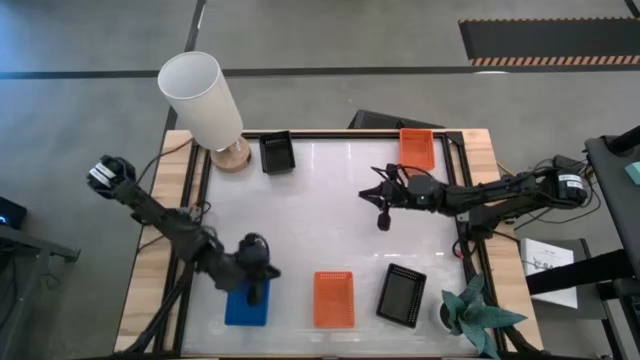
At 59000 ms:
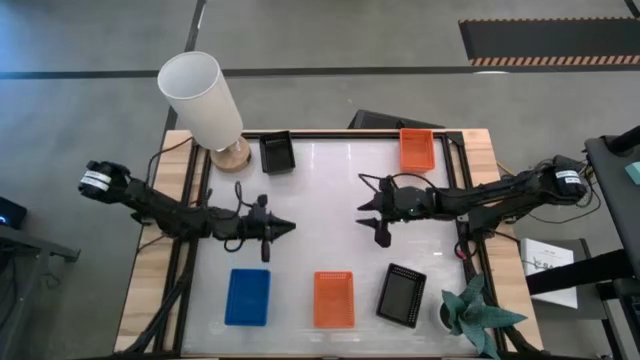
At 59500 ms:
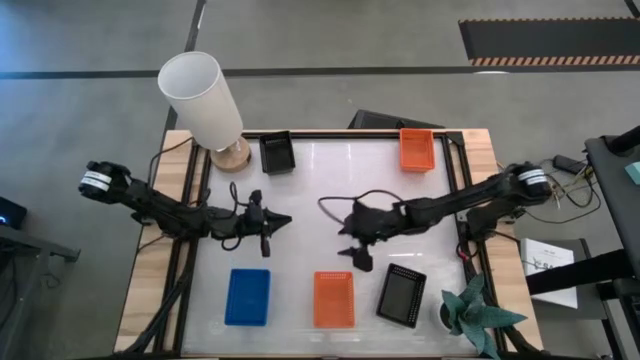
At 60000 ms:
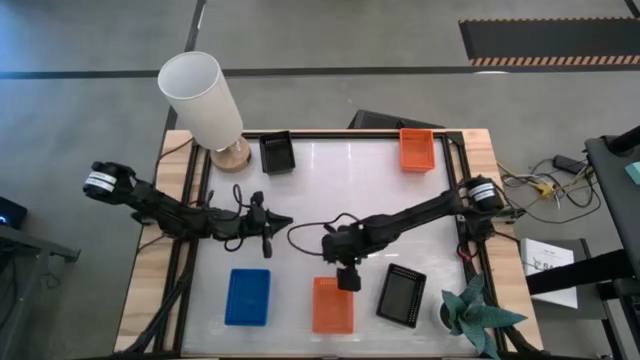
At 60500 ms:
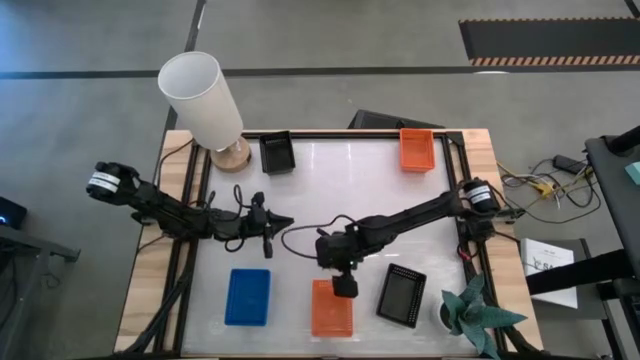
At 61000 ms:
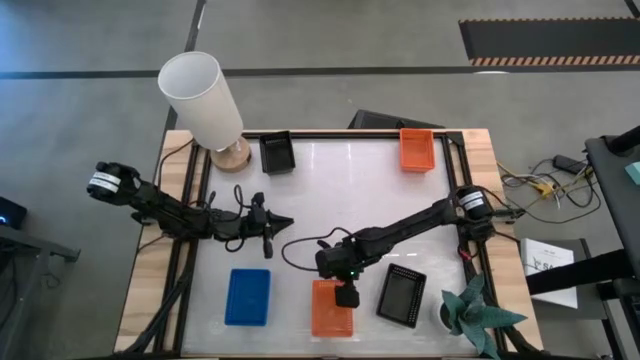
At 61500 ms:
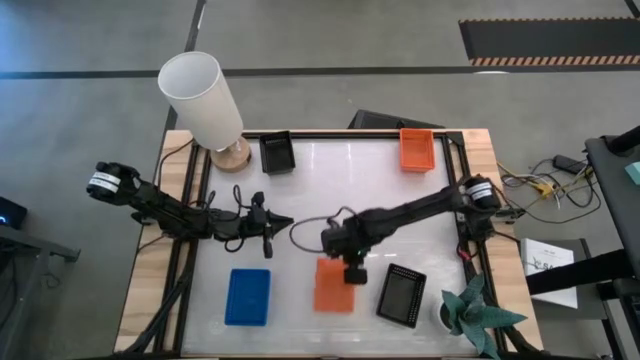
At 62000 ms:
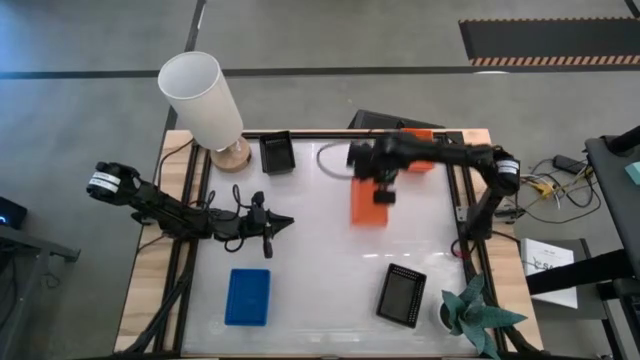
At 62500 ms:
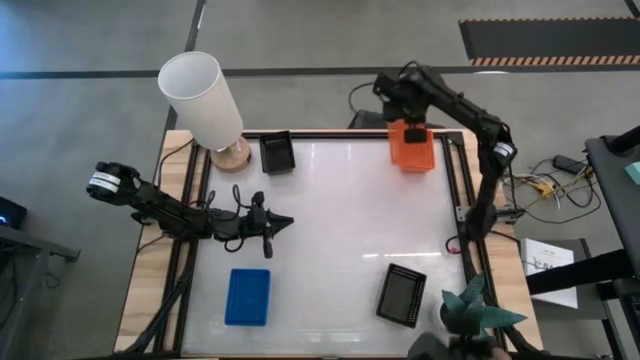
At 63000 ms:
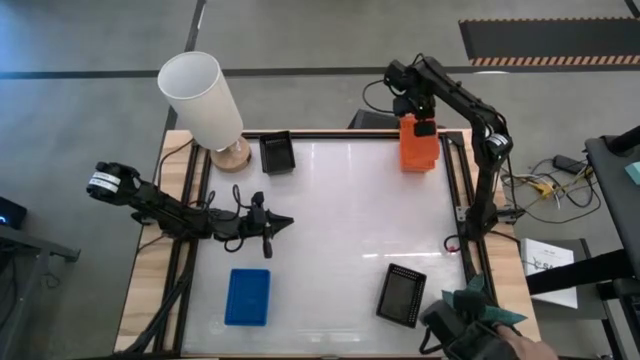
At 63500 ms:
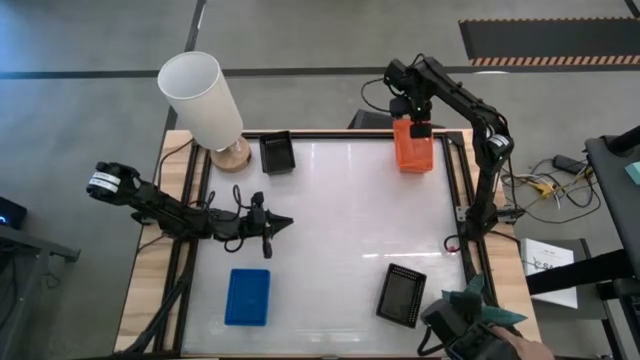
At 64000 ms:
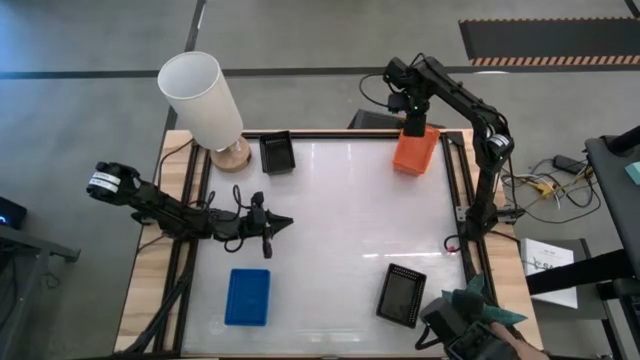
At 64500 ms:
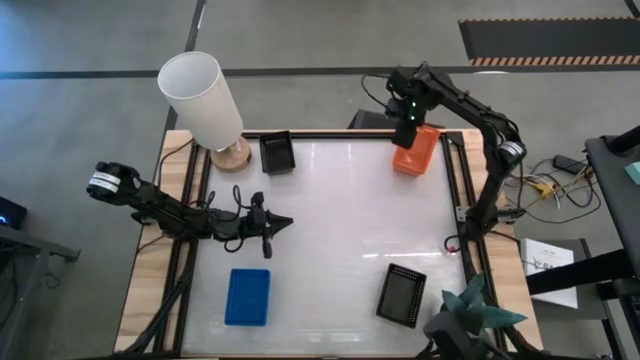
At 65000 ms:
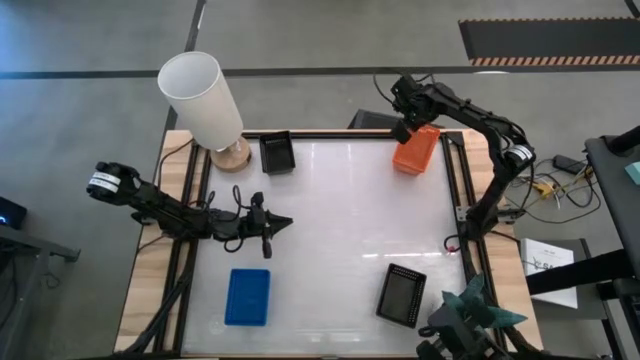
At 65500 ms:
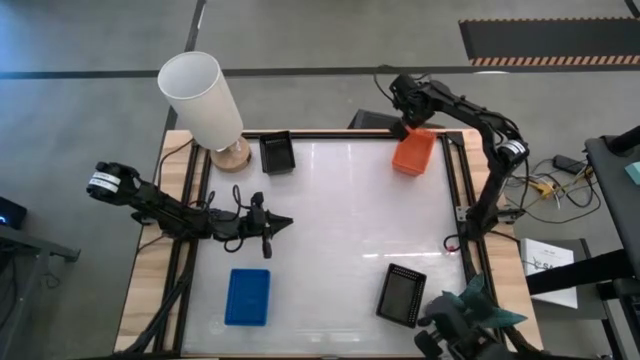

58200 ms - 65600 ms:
Stack the bottom orange bin on top of the top orange bin

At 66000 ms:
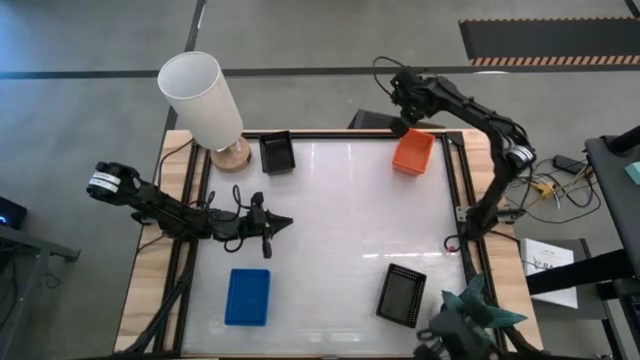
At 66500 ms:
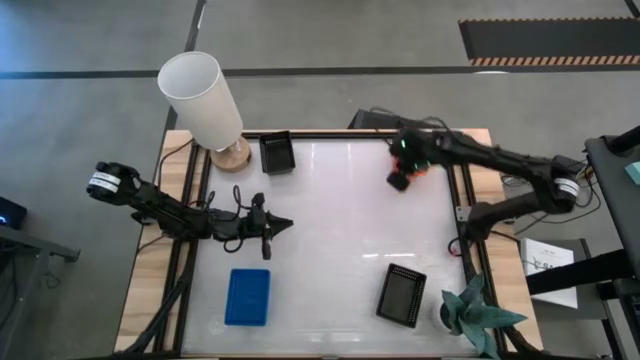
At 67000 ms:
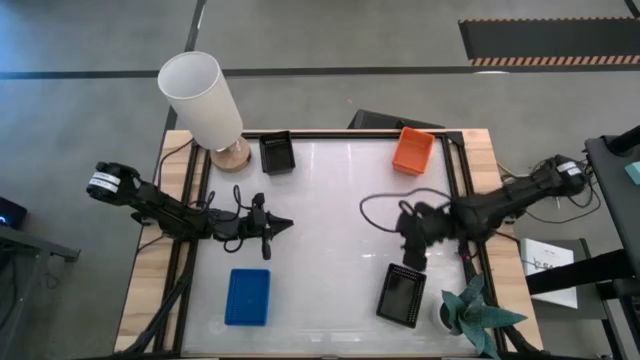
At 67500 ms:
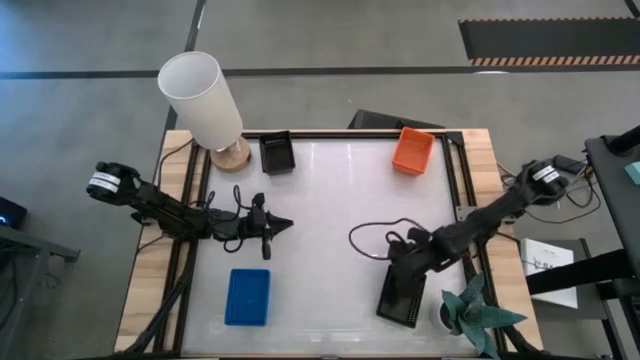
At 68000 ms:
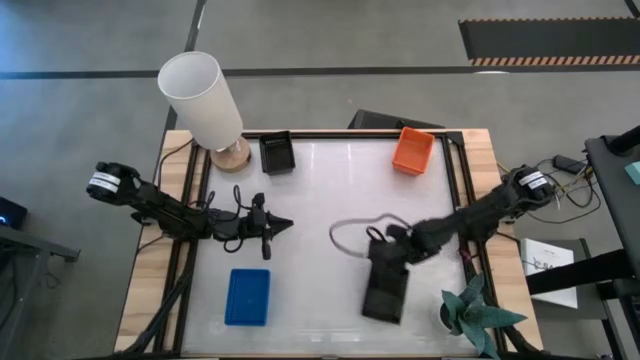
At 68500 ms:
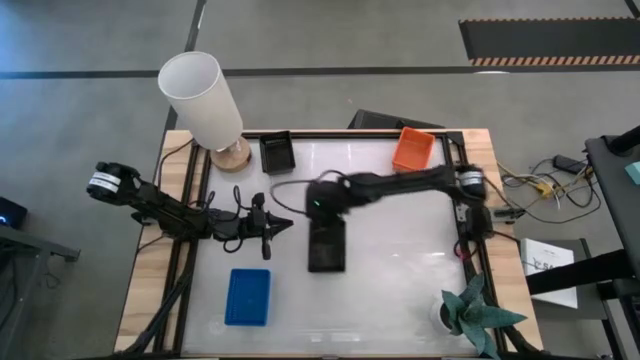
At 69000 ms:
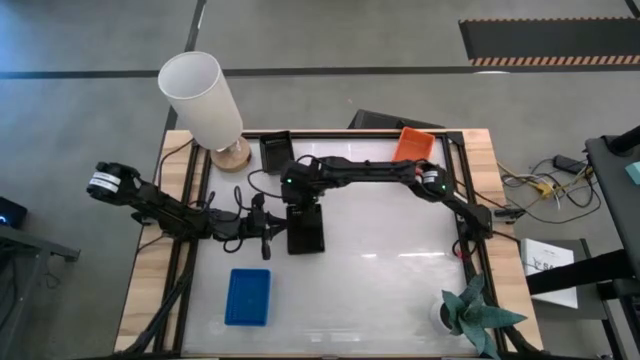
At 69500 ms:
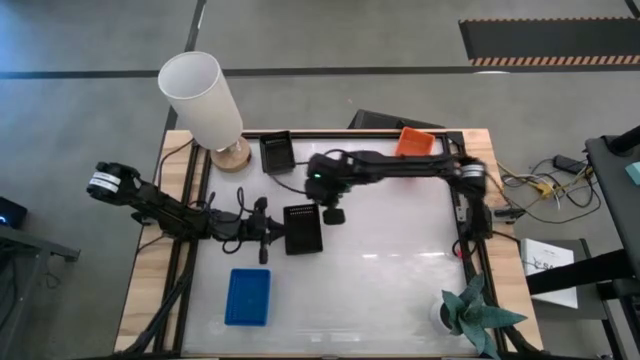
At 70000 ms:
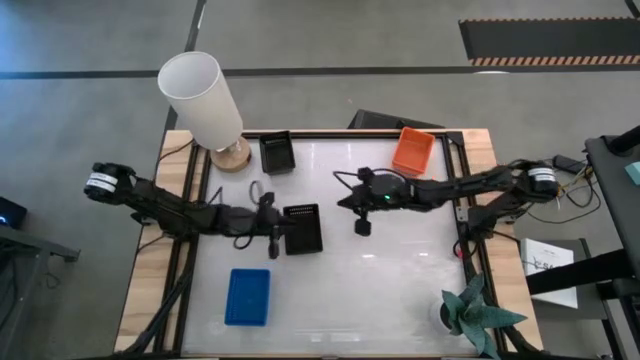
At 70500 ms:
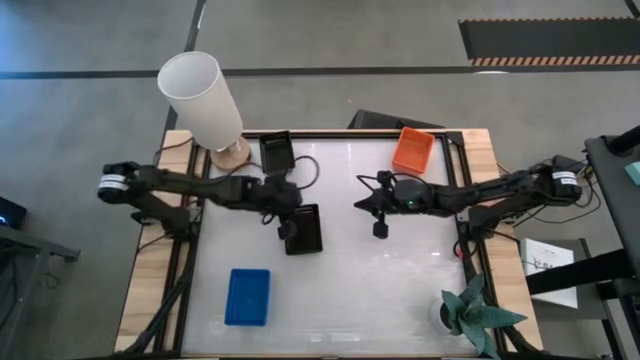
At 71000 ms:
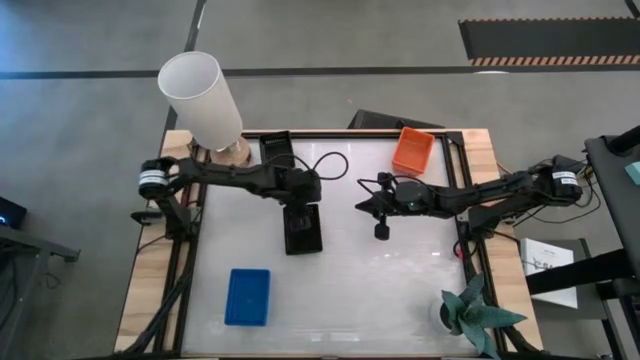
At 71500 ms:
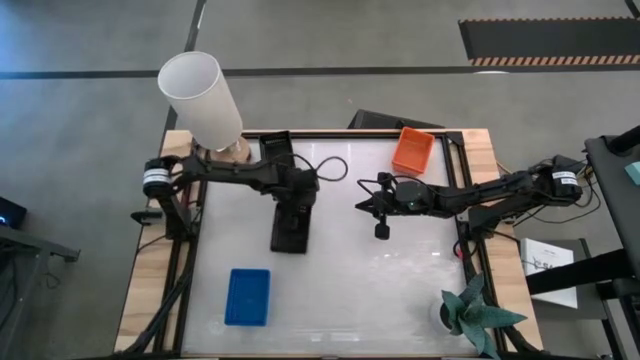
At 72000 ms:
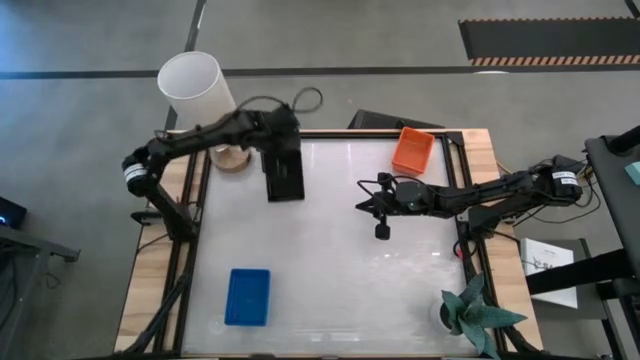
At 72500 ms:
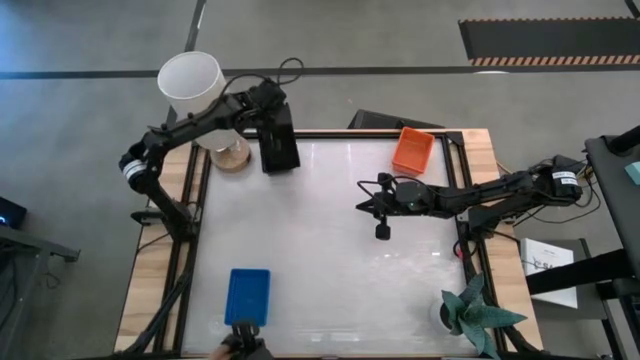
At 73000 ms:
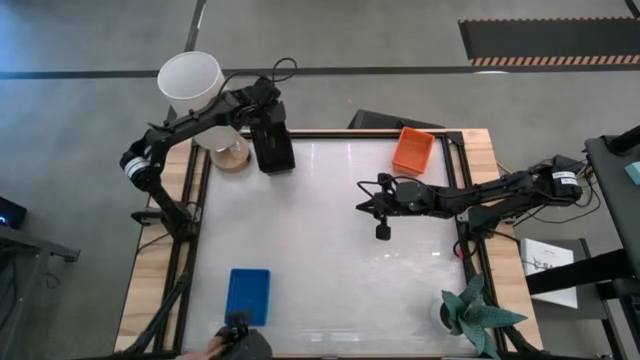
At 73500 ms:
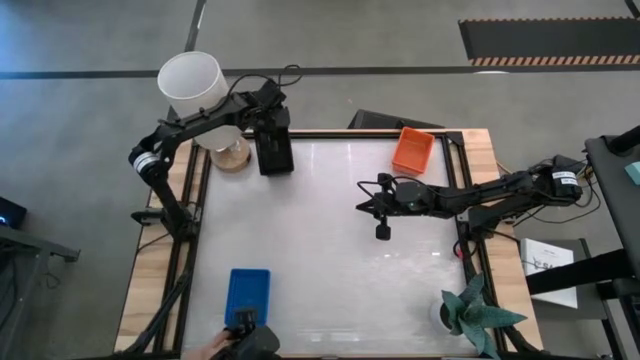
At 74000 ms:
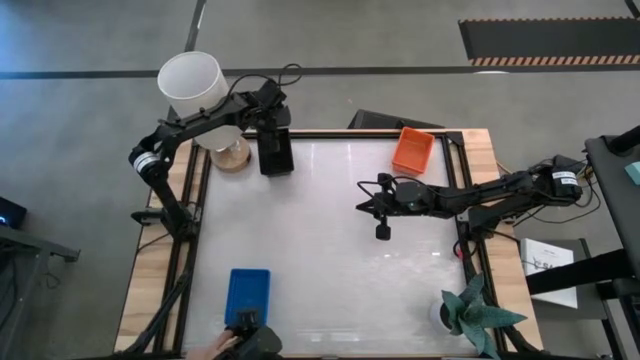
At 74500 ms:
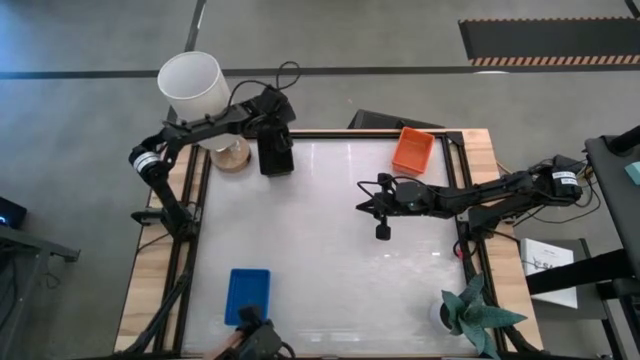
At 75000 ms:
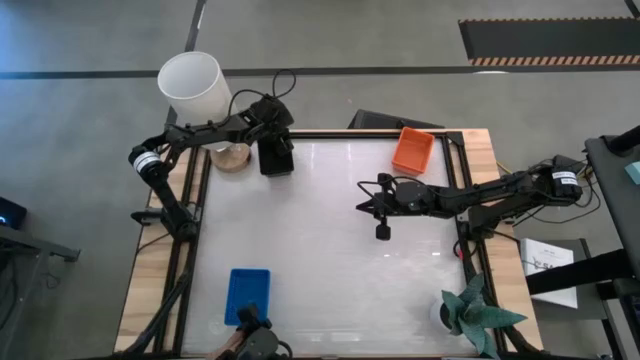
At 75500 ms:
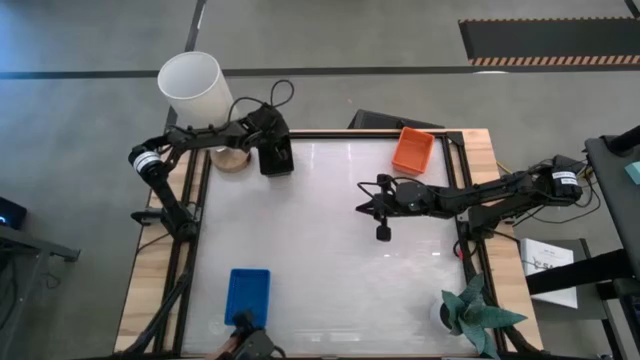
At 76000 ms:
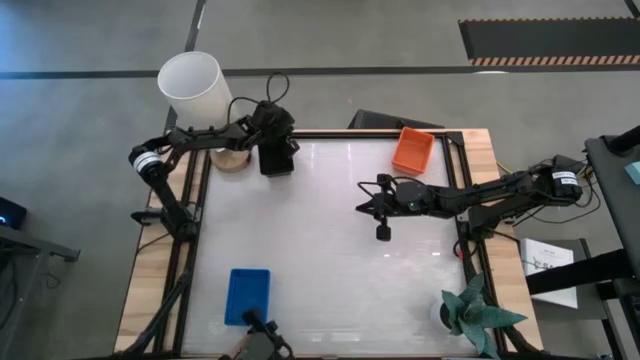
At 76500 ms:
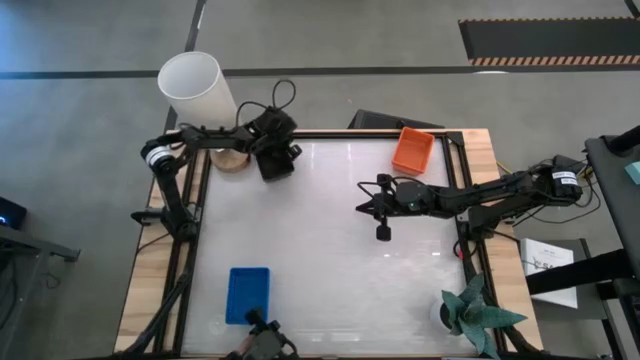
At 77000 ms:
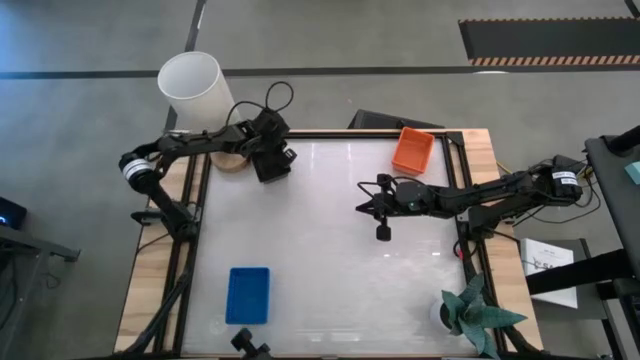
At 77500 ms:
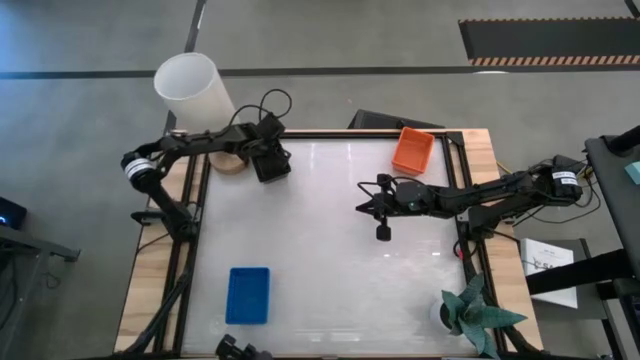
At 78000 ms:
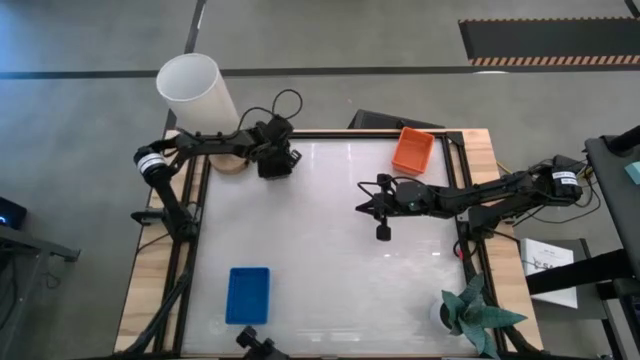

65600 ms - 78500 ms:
Stack the bottom black bin on top of the top black bin
